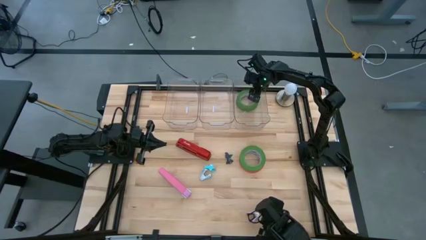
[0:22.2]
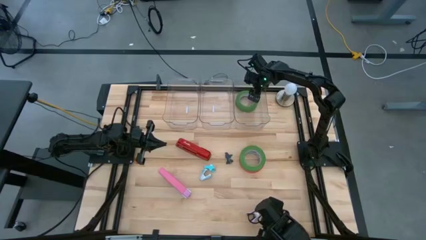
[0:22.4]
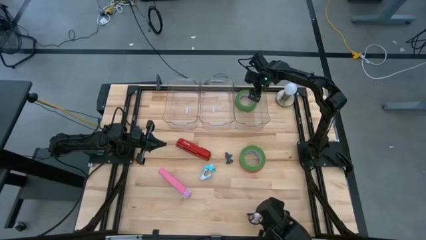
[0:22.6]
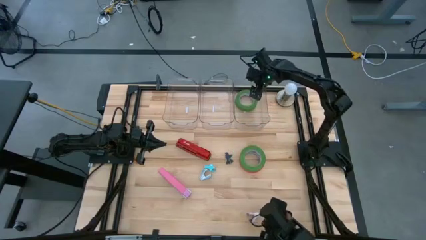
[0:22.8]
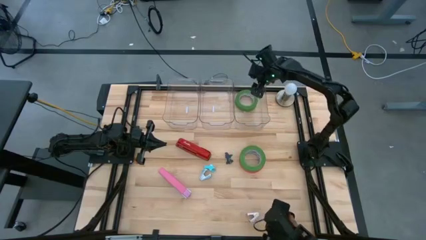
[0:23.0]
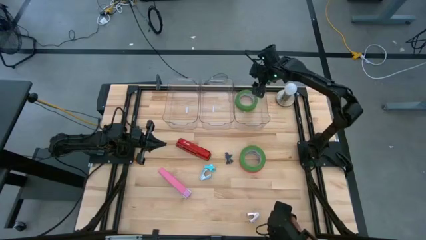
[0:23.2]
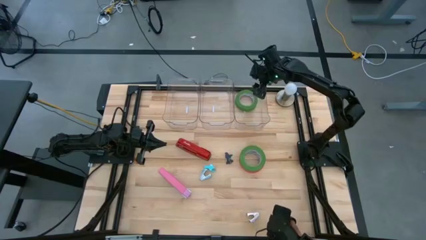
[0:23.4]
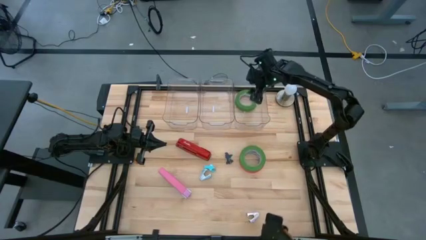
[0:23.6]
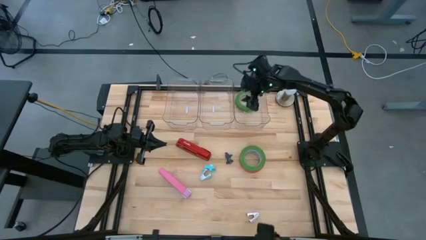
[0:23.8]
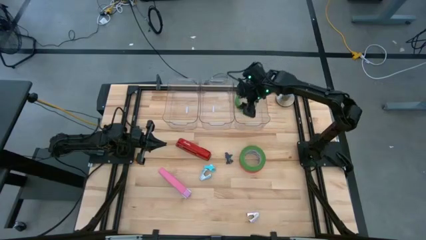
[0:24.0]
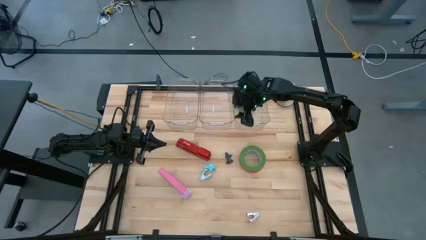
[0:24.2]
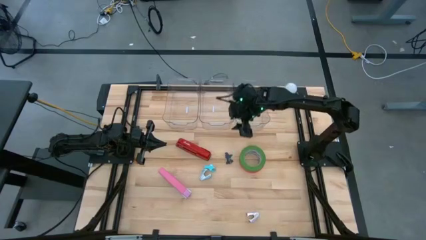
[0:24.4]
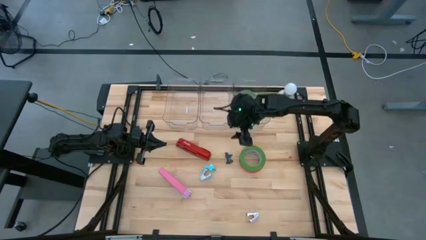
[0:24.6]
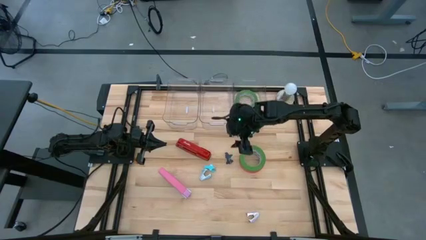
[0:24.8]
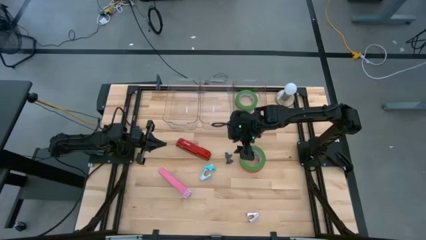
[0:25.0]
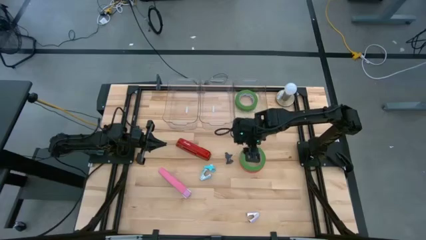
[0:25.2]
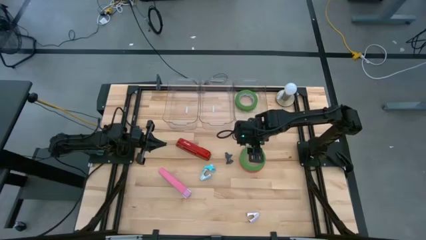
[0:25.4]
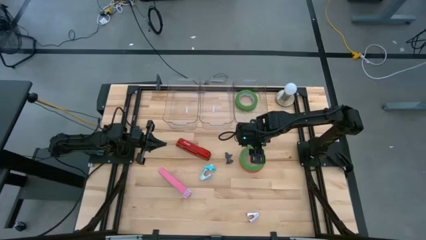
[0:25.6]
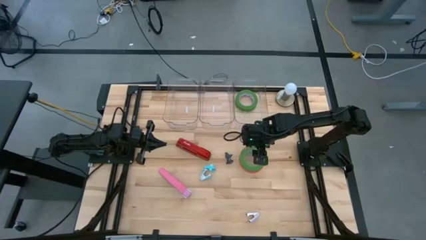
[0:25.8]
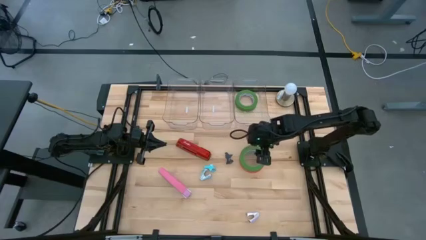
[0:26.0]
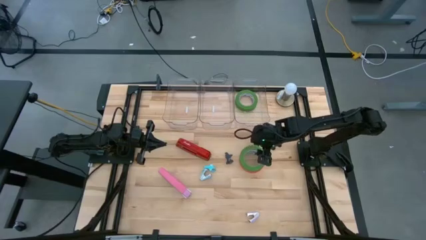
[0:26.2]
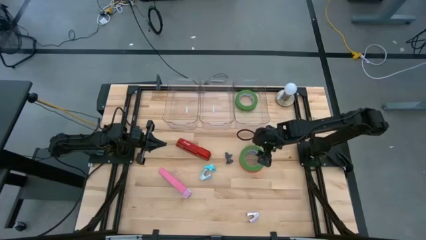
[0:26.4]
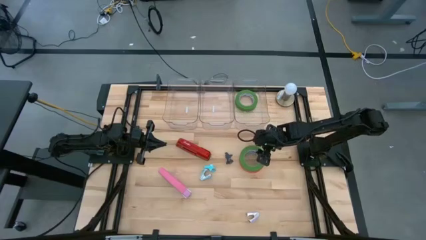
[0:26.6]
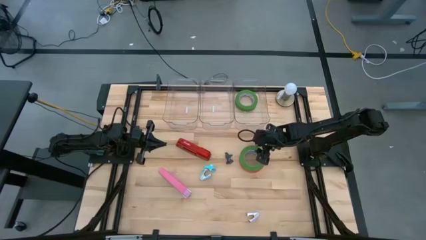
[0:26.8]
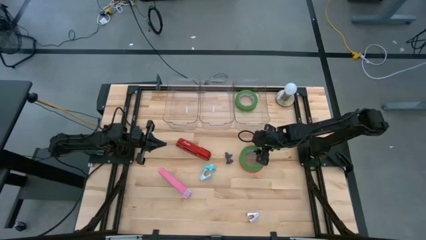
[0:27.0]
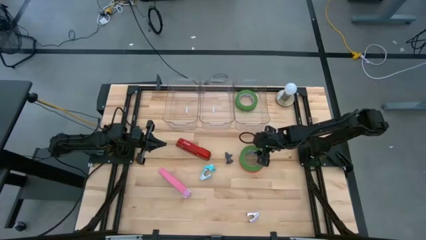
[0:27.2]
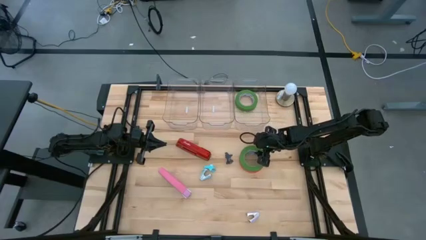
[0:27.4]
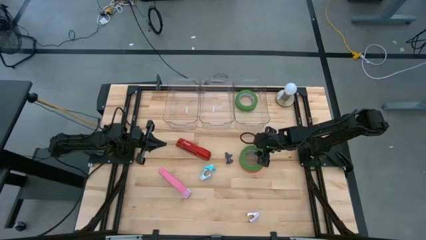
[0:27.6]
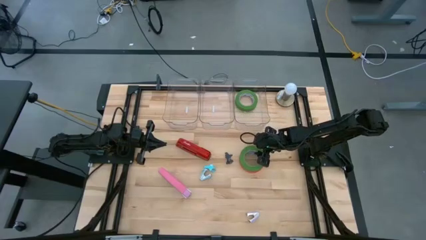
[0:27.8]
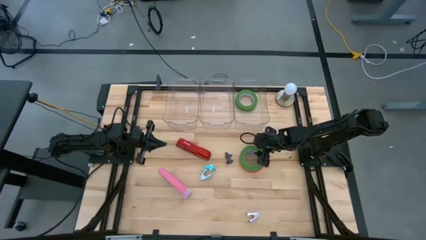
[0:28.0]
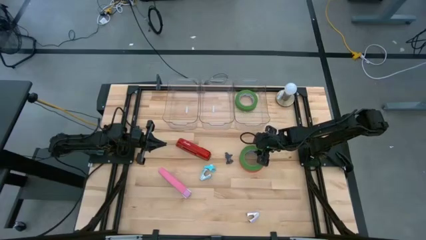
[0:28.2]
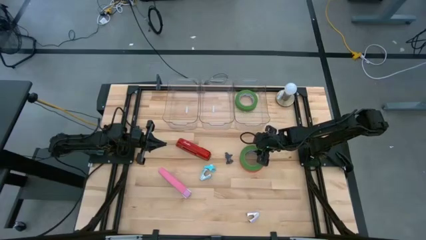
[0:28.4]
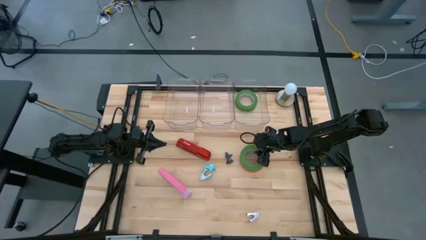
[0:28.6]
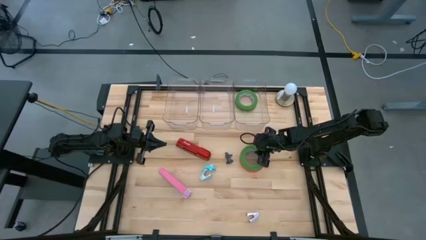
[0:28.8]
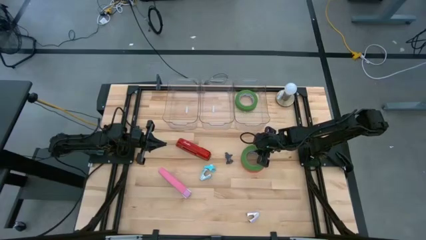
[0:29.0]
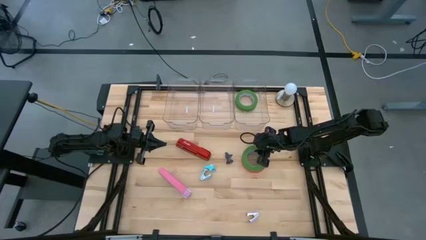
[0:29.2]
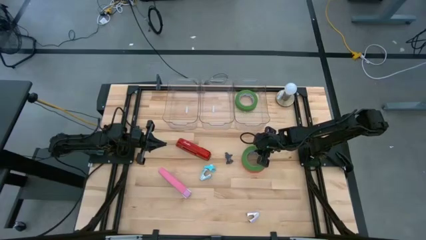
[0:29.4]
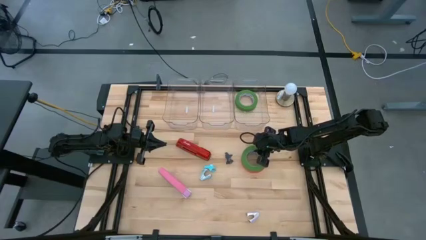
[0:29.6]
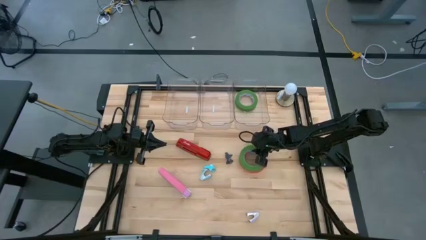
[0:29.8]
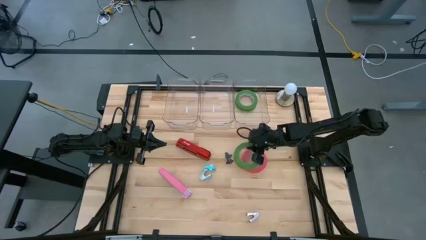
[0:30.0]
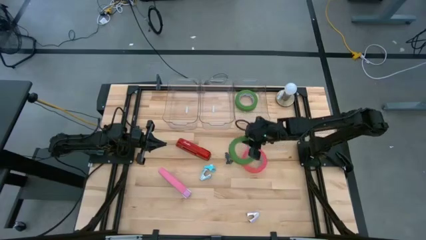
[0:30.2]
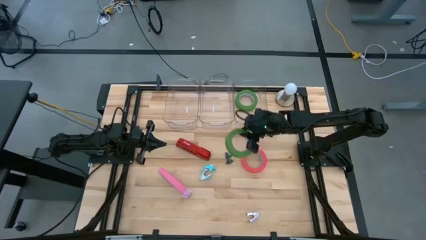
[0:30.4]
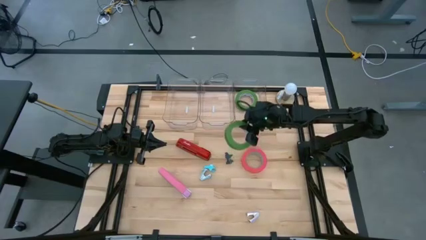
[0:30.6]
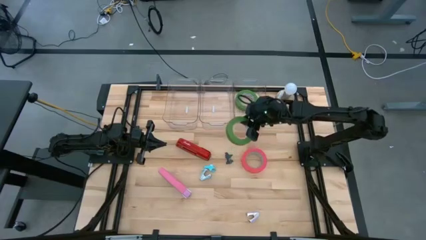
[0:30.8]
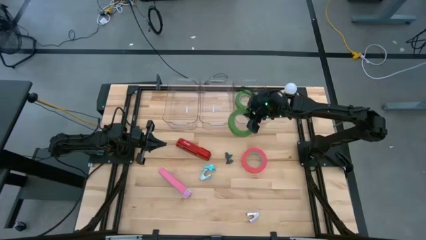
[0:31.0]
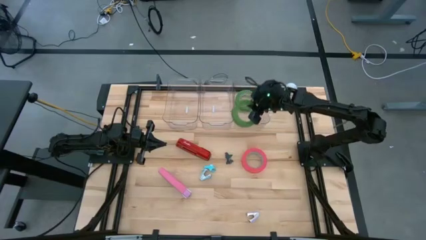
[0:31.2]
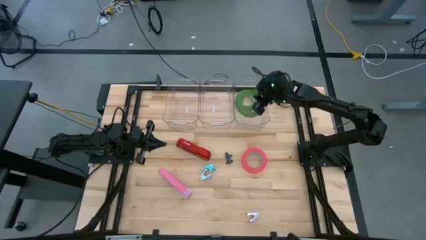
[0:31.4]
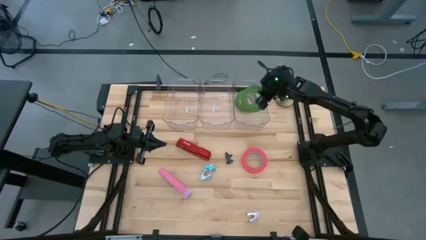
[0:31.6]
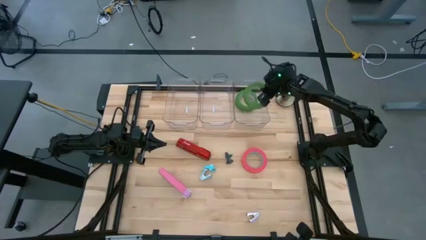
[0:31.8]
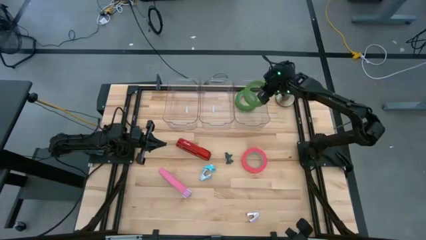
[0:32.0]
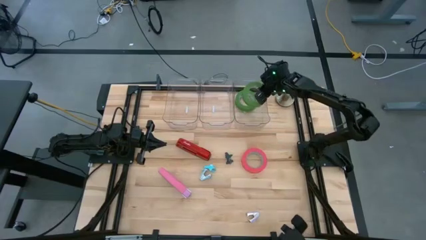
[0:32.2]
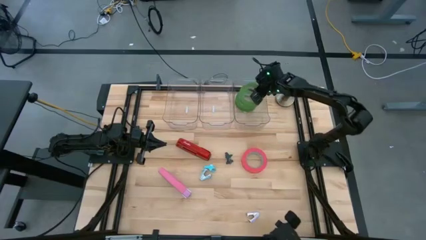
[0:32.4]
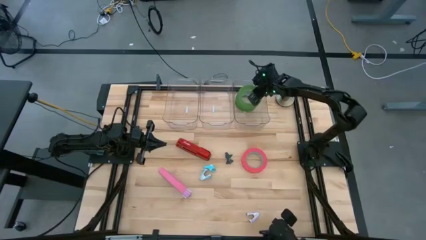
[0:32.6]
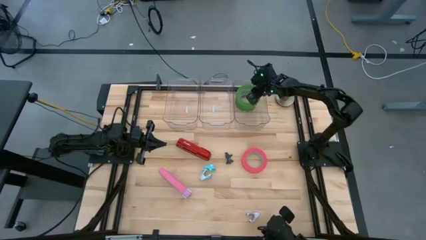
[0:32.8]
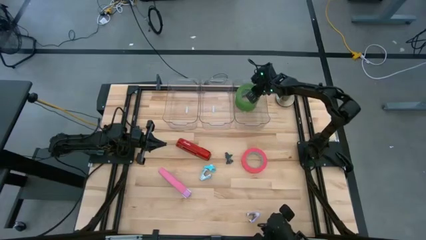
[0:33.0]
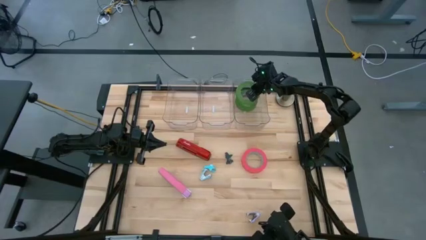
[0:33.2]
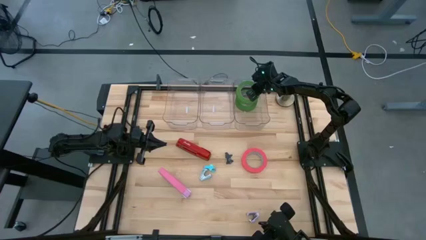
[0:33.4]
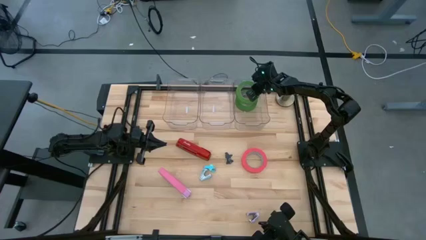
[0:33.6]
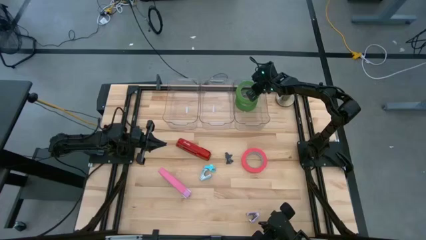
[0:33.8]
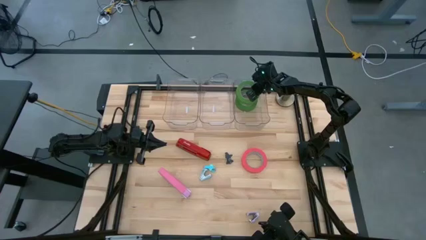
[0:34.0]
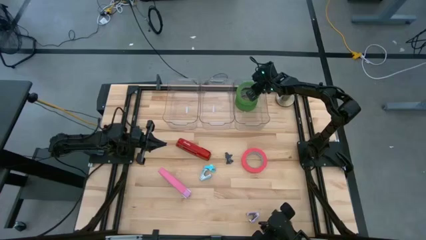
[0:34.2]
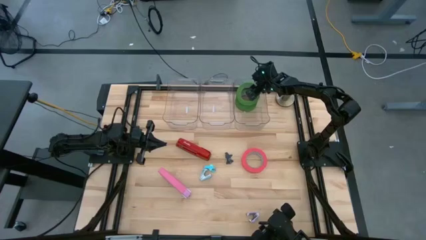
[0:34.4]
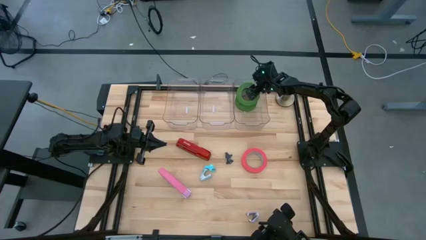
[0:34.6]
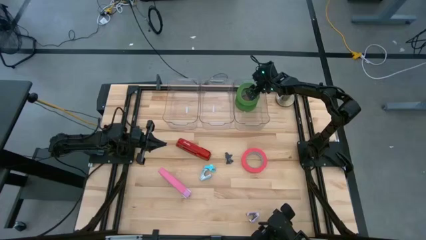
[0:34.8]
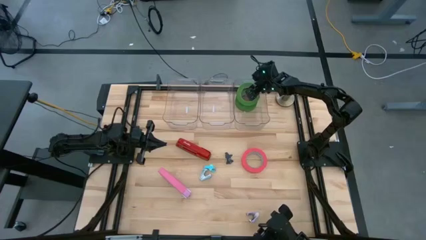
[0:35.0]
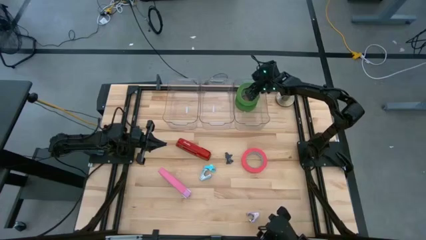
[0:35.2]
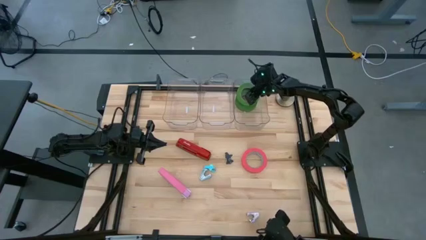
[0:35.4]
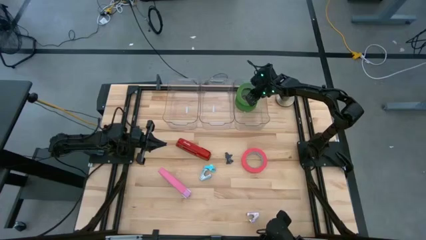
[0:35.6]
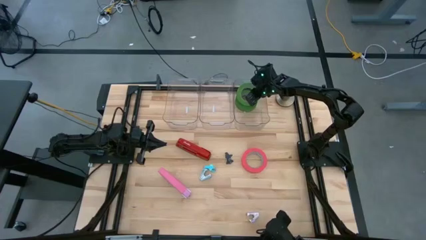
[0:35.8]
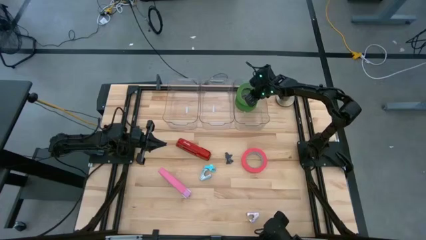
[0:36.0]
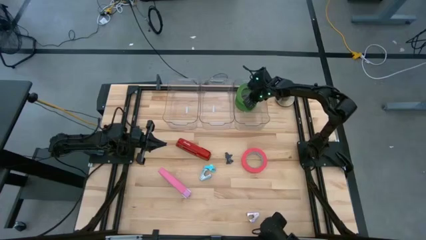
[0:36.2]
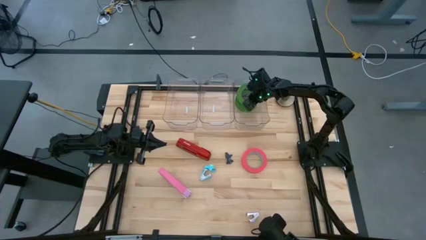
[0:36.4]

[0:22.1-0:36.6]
Task: Pick and place Stapler, Stapler remover, tape
Put the green tape into the right transparent bin
